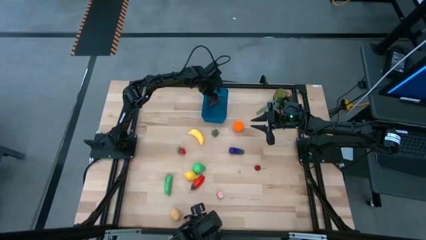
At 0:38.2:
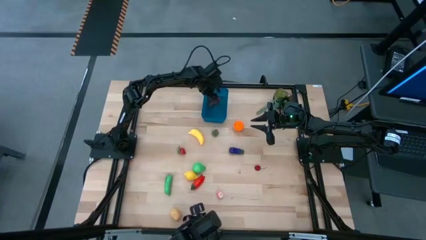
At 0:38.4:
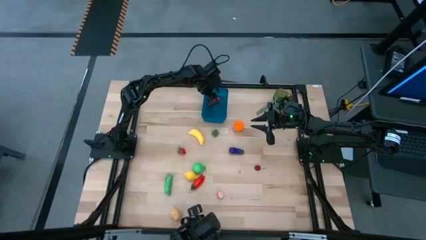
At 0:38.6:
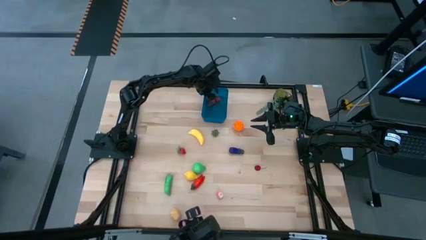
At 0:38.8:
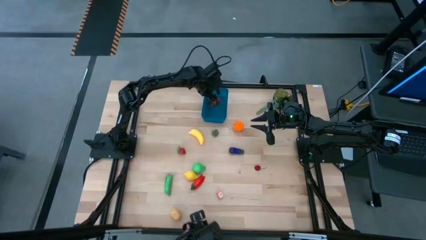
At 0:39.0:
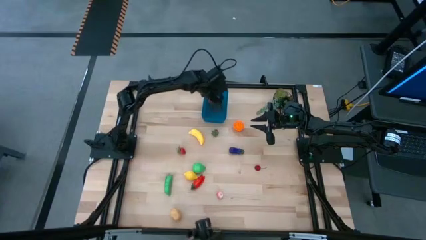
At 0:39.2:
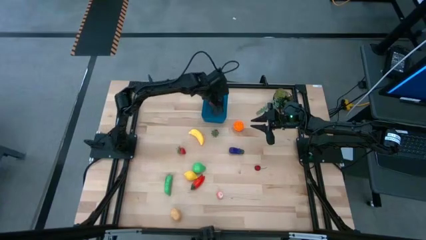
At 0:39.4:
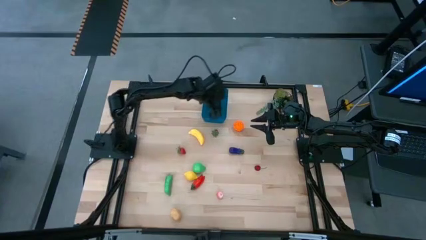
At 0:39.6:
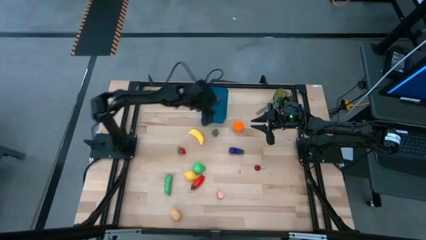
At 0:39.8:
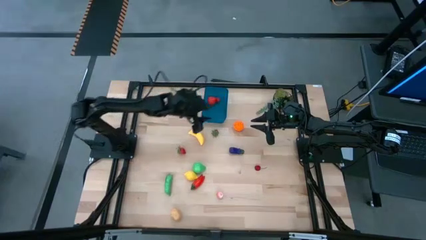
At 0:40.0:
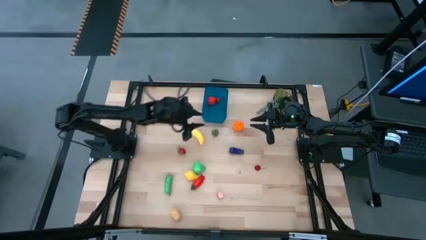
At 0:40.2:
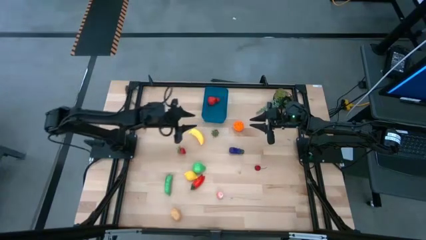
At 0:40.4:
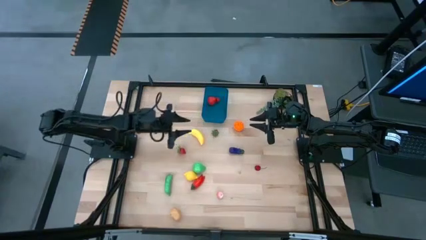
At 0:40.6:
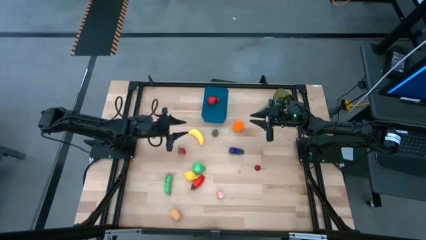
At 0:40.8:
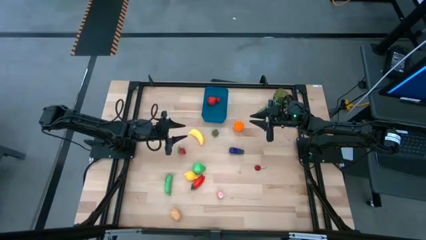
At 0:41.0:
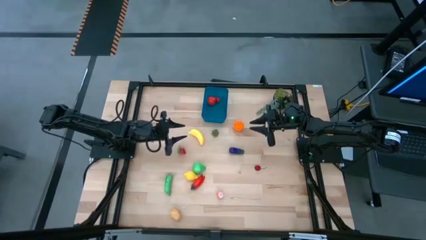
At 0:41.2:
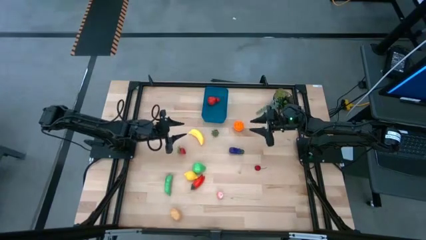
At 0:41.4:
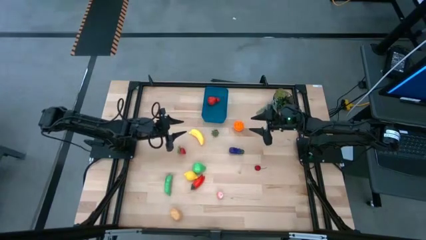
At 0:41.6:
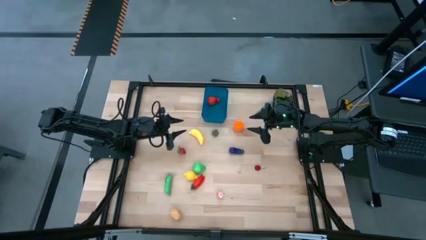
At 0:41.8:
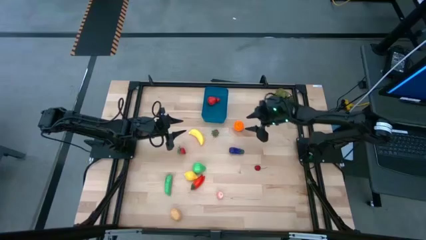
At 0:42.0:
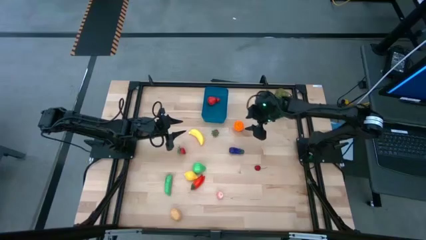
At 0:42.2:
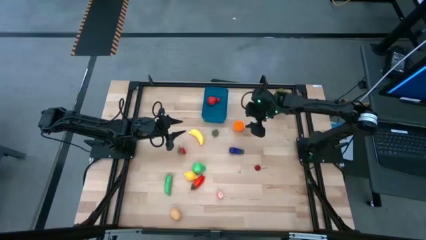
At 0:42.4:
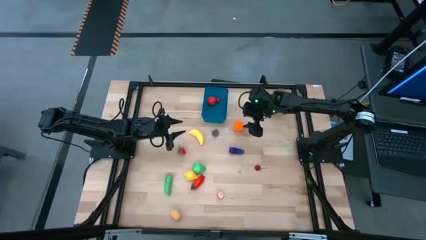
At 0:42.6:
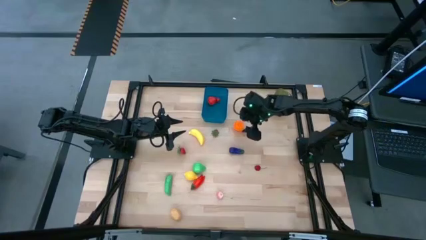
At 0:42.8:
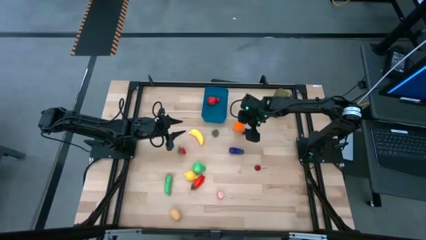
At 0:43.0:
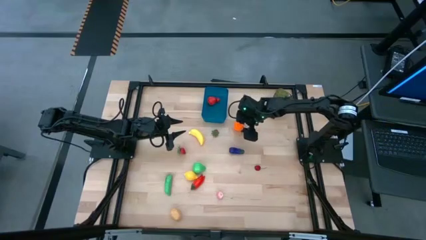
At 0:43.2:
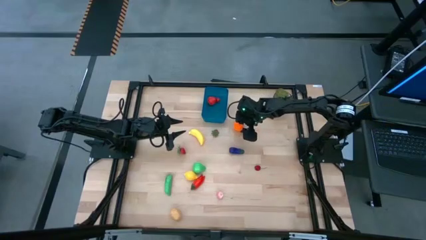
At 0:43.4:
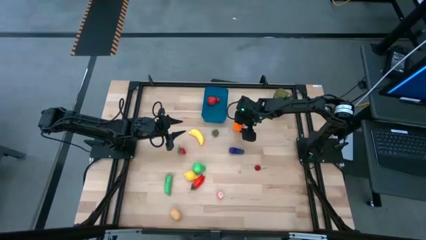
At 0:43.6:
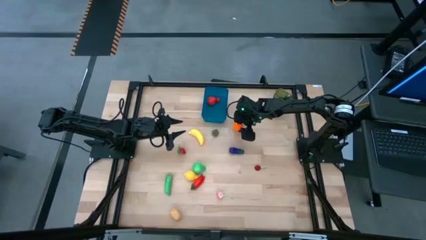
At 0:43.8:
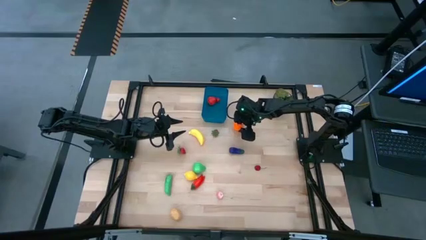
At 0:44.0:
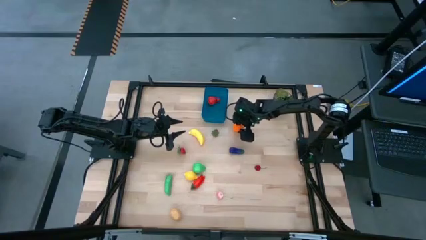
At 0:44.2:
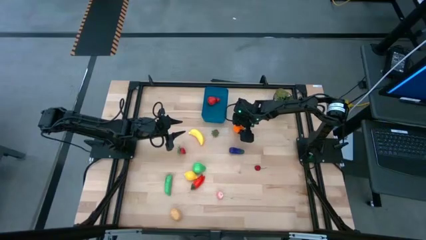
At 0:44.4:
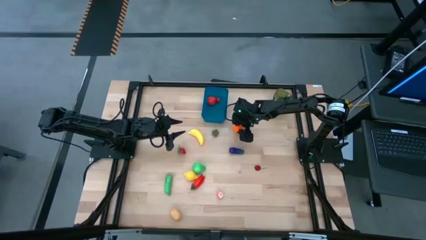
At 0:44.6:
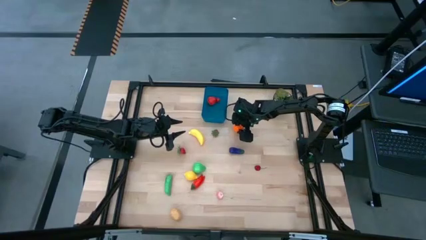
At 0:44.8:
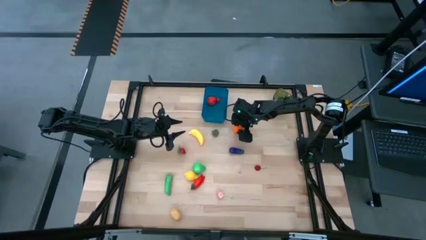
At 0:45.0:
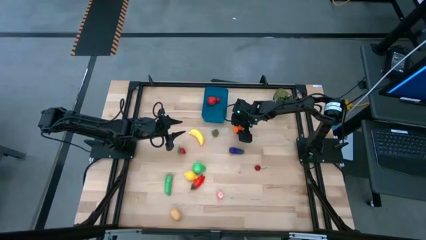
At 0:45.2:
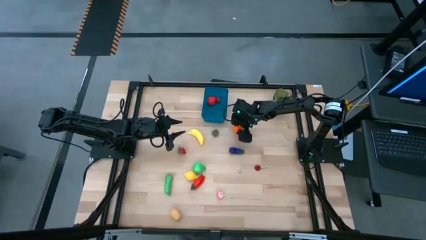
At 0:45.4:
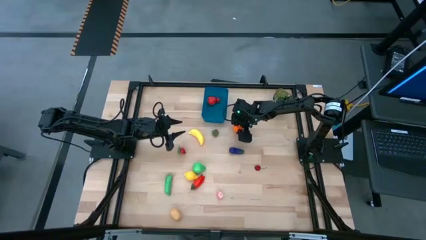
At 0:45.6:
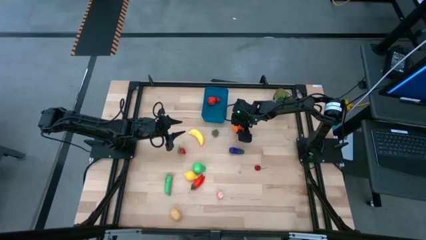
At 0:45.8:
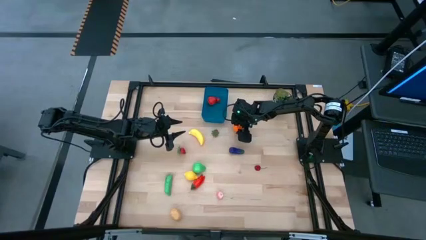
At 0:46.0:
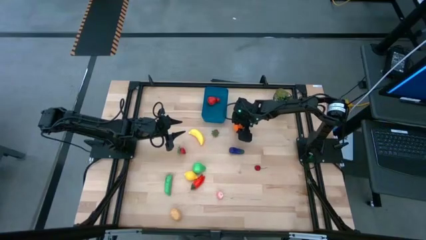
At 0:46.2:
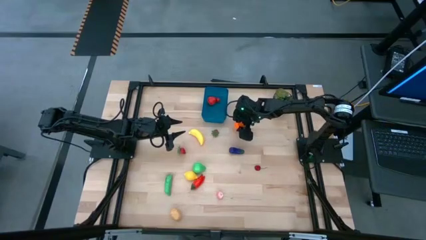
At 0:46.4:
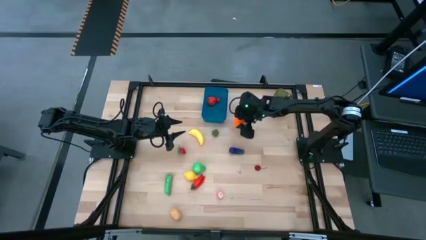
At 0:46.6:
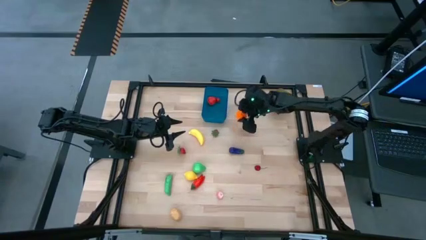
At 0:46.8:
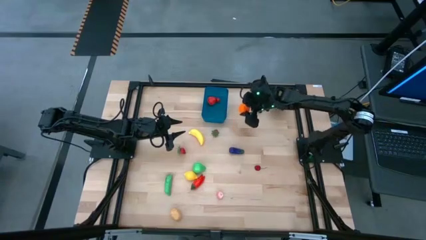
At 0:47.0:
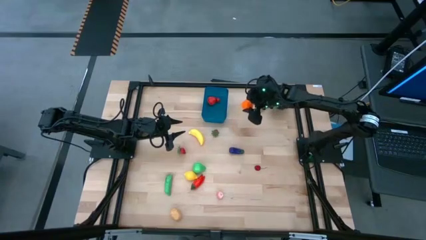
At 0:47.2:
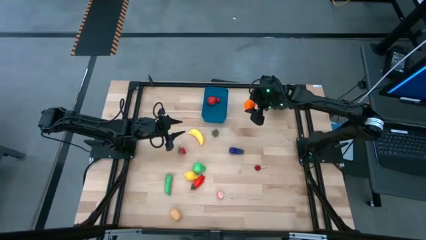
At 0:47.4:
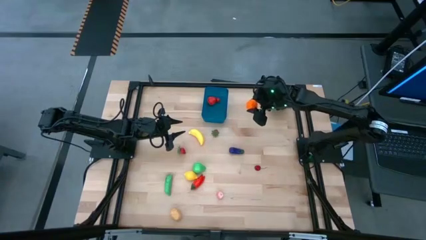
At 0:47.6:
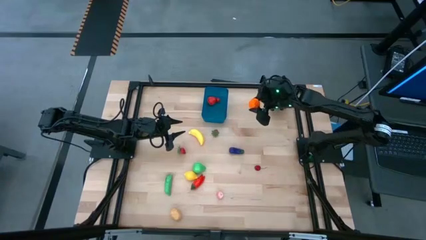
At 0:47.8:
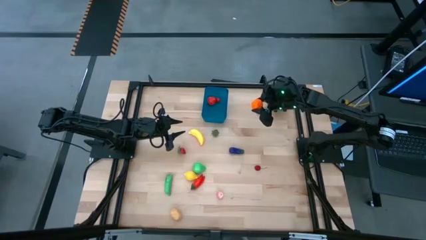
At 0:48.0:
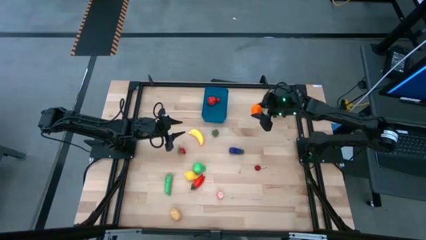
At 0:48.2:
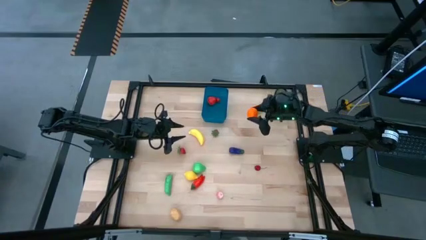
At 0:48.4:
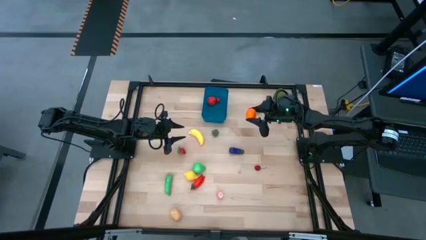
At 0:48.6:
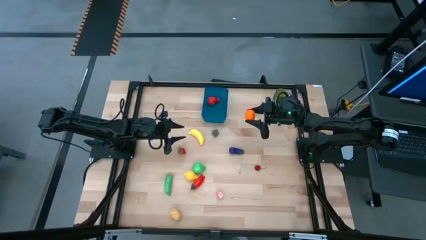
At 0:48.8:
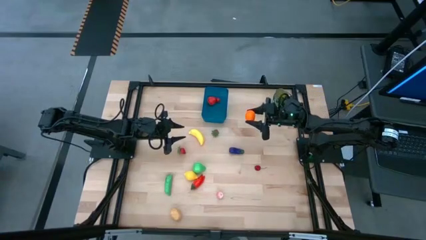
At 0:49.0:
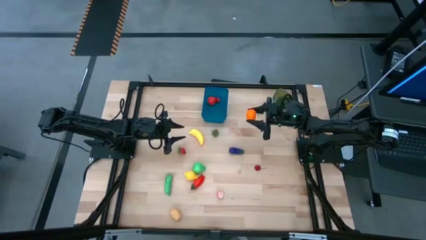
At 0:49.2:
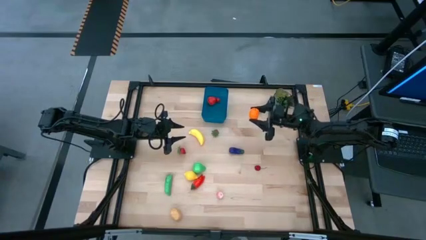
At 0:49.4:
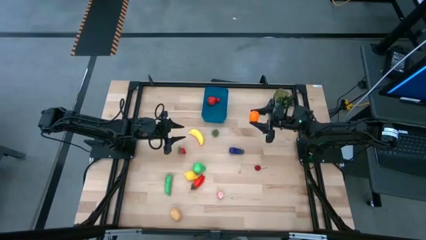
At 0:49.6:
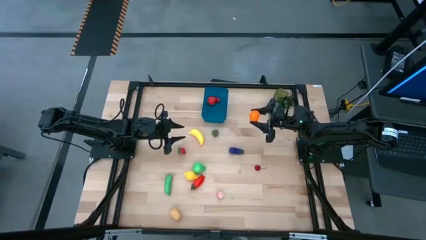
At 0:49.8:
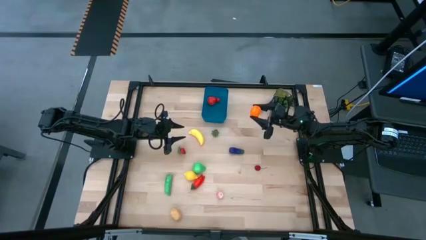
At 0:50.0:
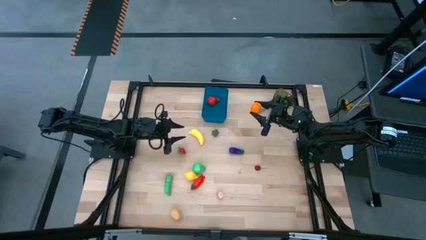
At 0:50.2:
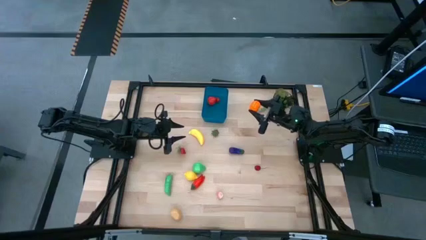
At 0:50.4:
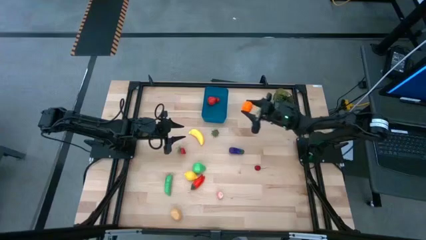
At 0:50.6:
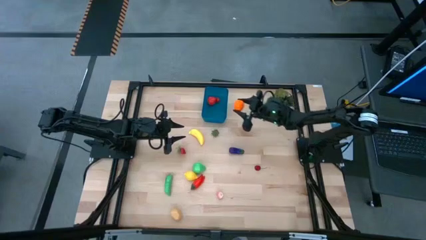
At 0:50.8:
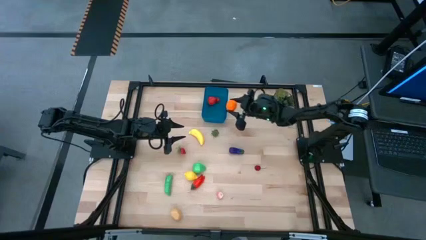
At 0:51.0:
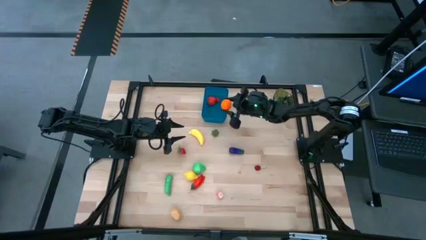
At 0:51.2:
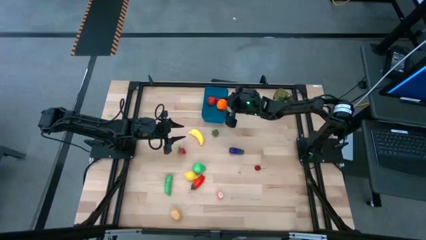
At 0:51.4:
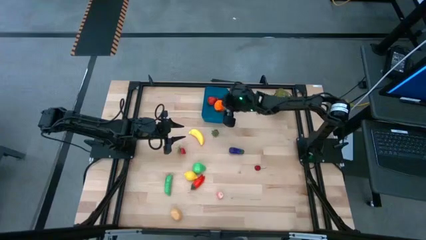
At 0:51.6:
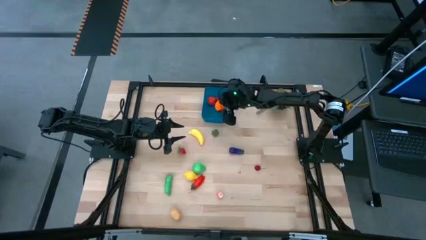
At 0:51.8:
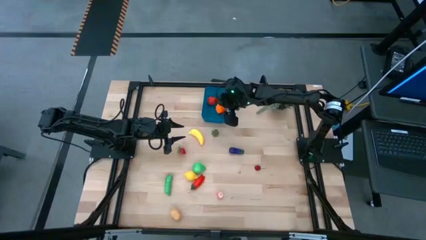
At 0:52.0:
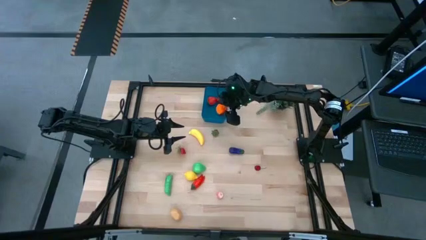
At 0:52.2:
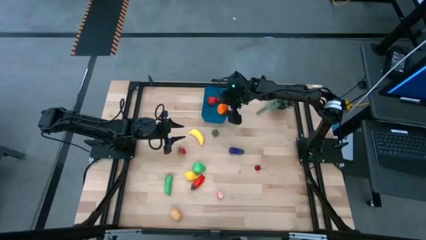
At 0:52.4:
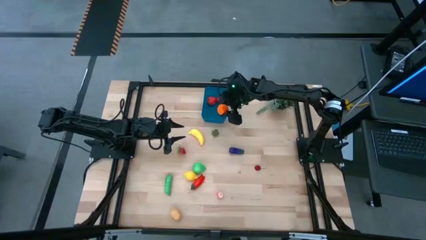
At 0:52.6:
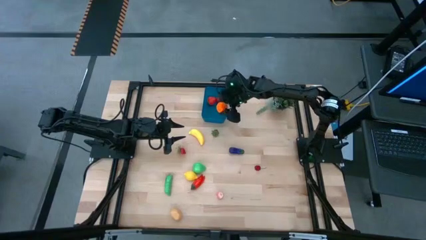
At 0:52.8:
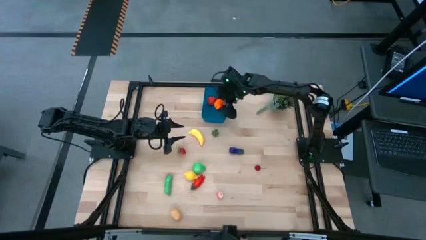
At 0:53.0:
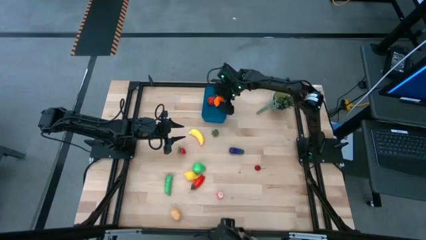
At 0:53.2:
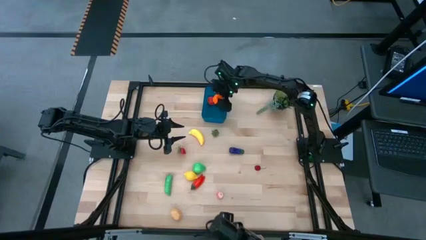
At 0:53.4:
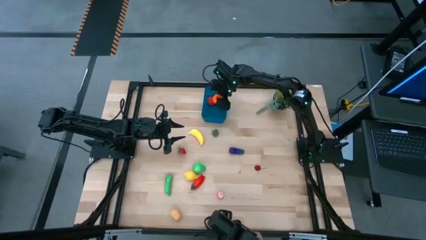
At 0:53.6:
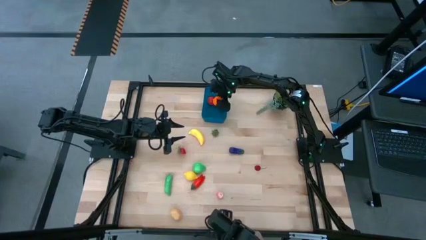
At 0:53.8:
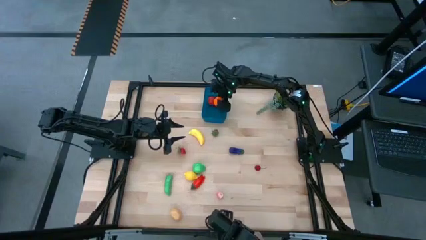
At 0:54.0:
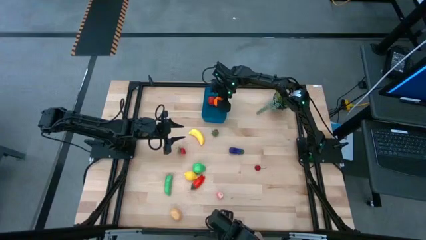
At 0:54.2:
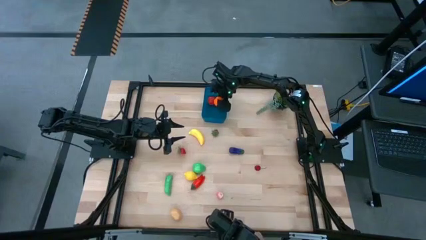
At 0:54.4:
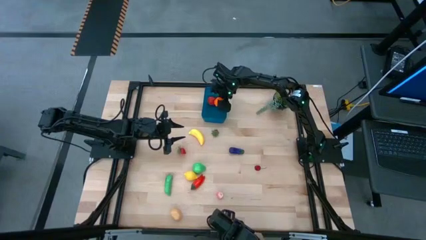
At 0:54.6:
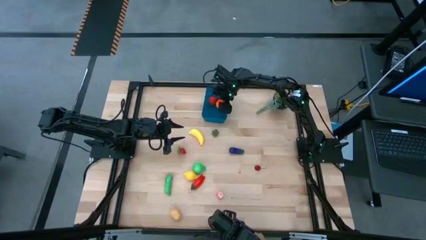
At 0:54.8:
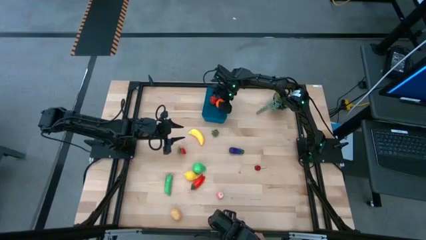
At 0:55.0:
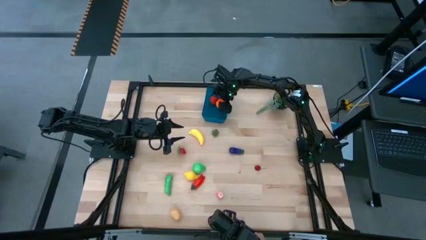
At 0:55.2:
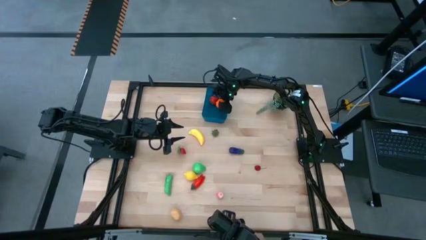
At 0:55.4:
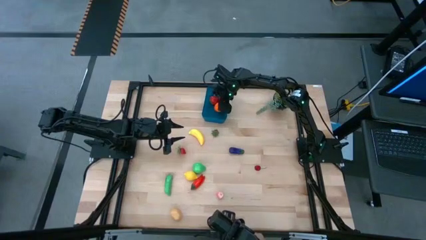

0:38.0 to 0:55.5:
Task: Pick and placing Produce into tupperware
Put the tangerine into the blue bin
